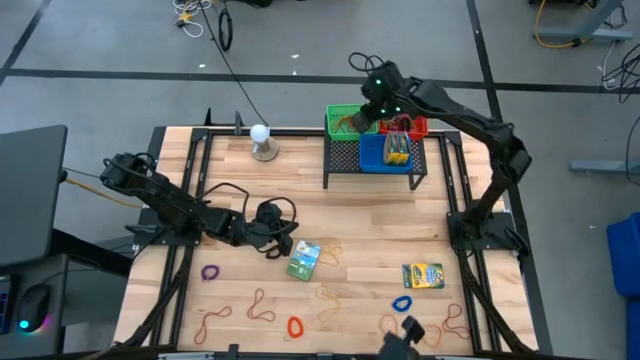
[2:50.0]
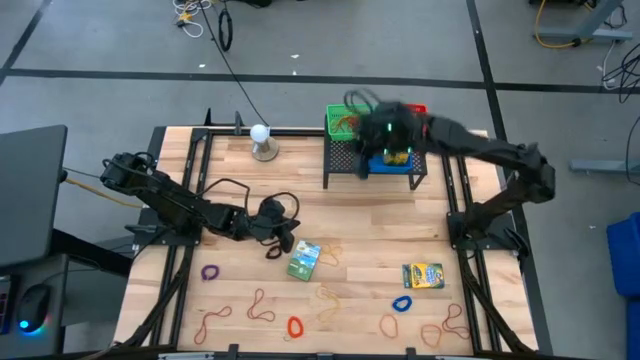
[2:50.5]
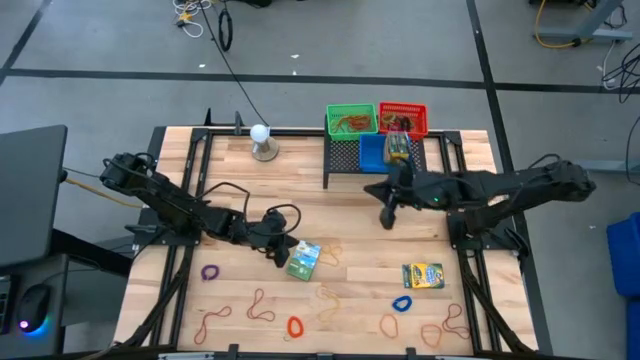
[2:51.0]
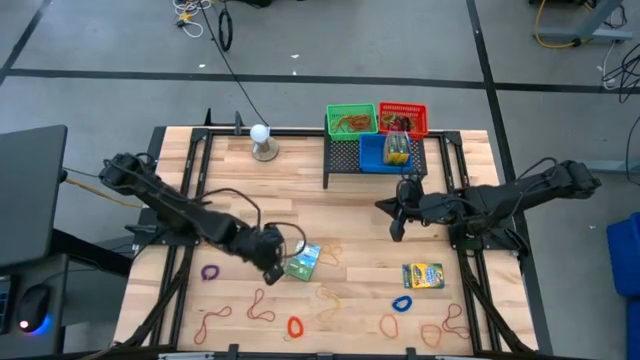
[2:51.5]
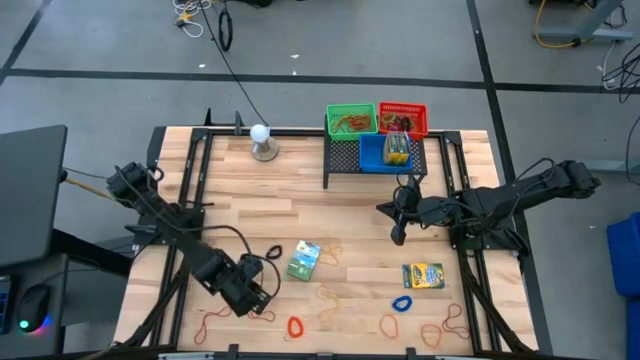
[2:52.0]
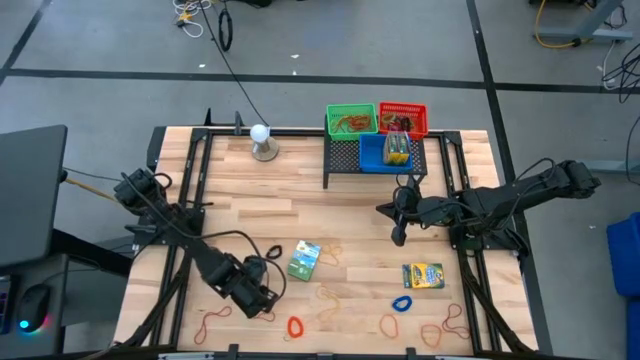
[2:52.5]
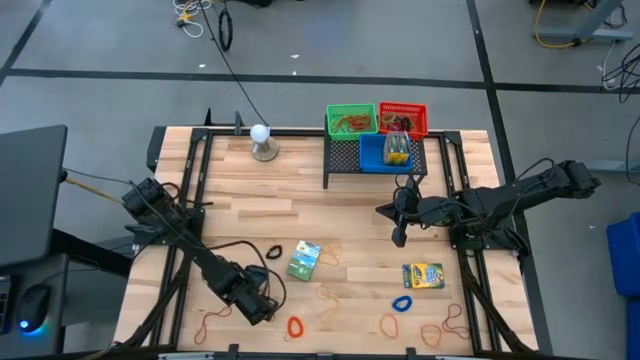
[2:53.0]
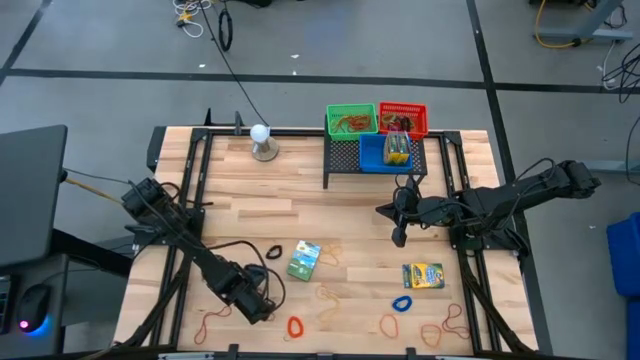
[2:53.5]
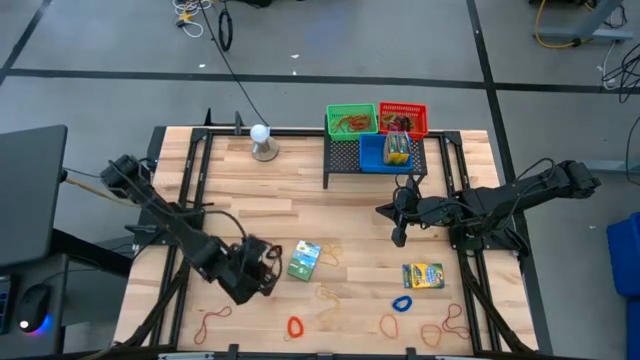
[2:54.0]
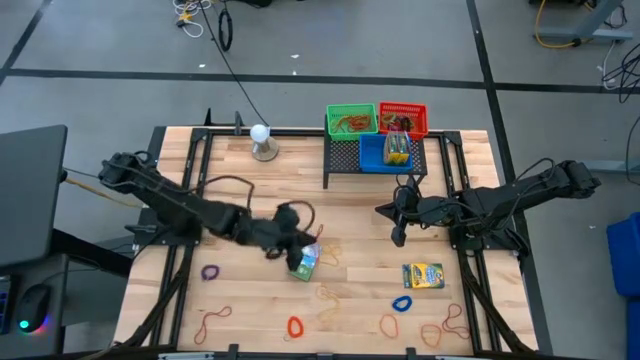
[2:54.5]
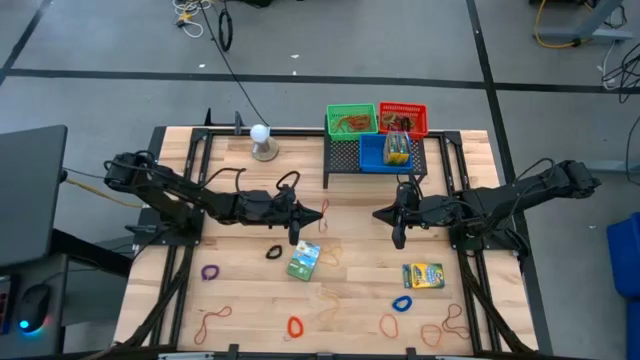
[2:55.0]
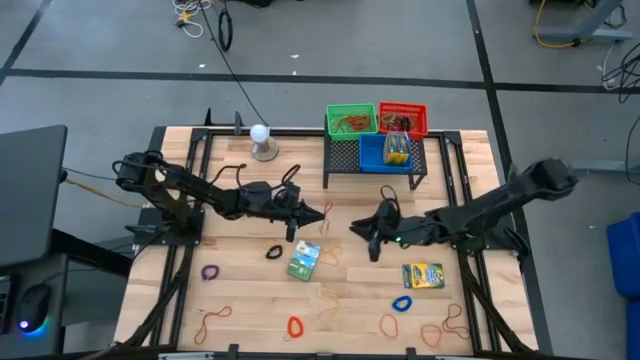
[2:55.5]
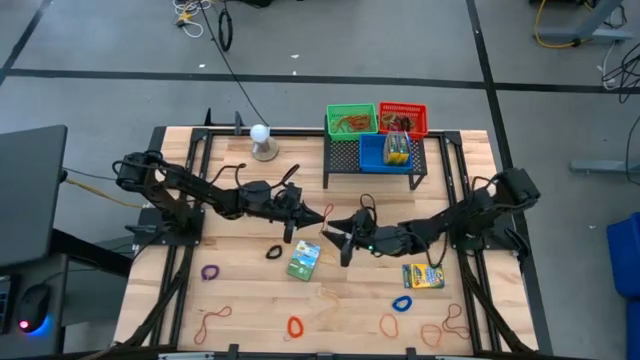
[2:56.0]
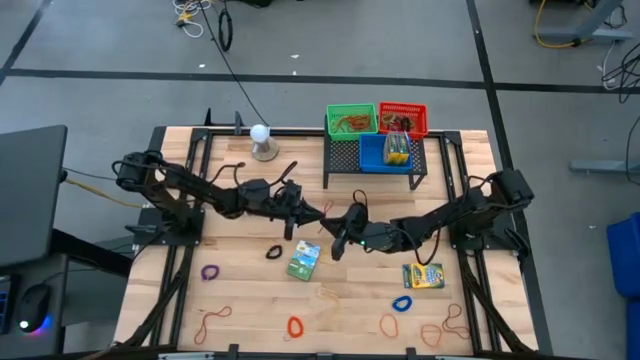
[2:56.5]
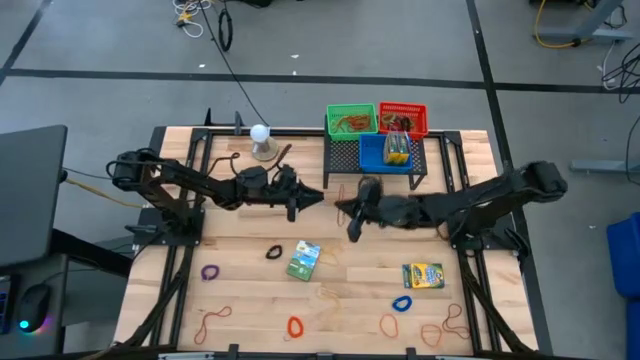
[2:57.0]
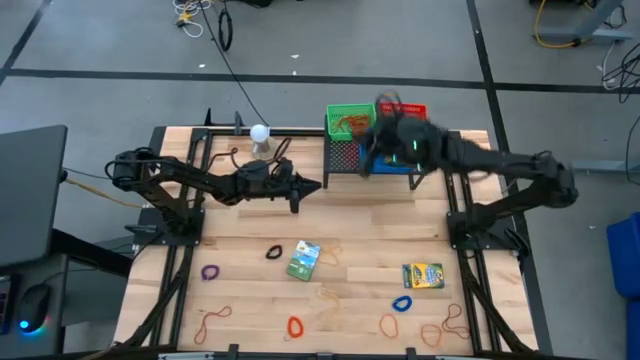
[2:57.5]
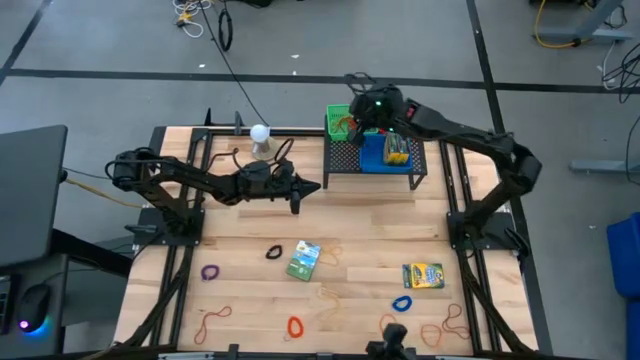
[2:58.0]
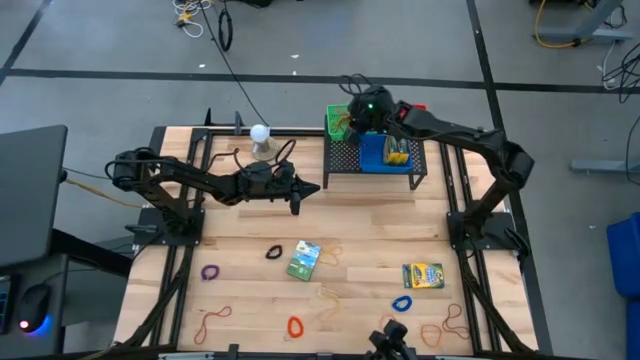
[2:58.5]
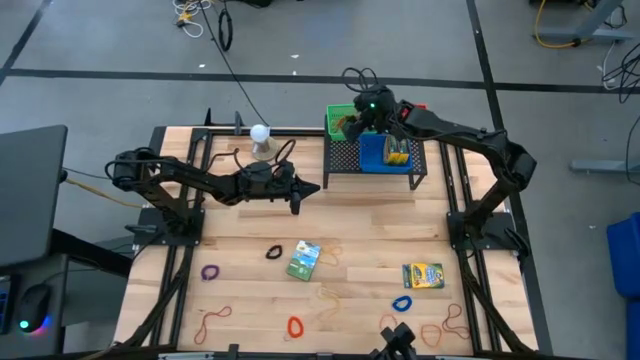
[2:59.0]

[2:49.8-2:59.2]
Task: Pick & Place Office Desk Supplies
Put the red rubber band into the green bin

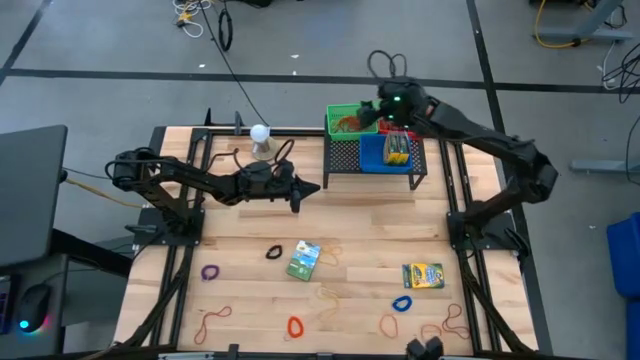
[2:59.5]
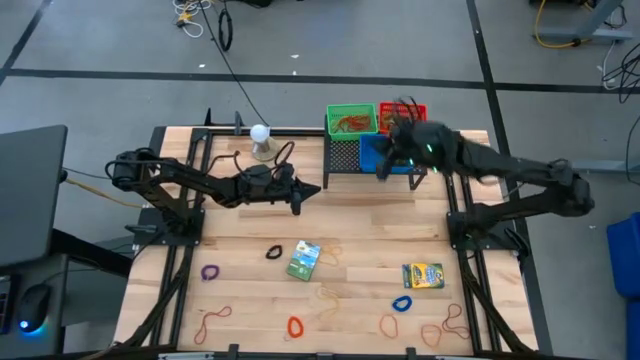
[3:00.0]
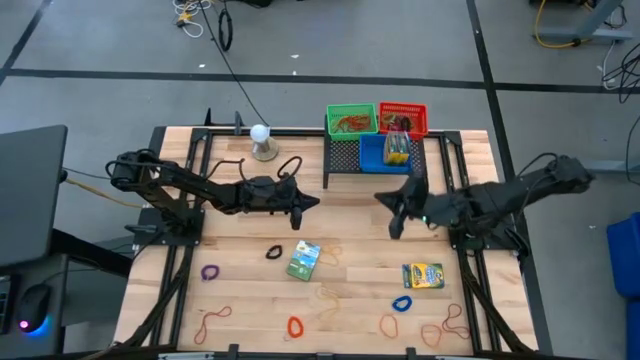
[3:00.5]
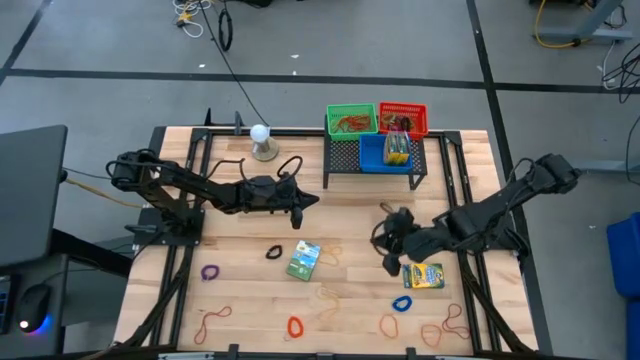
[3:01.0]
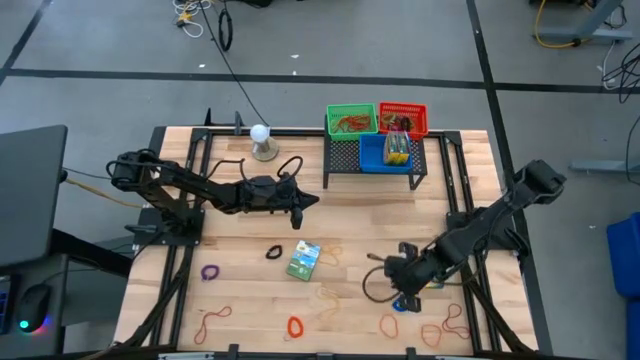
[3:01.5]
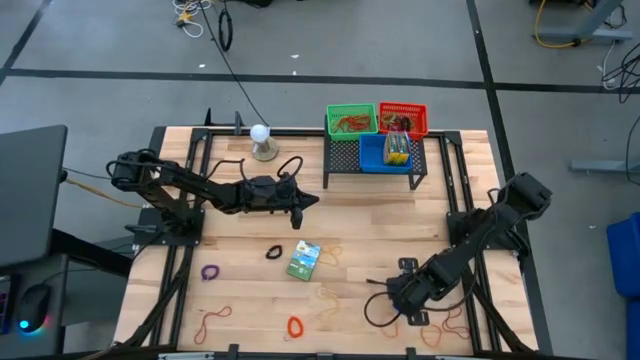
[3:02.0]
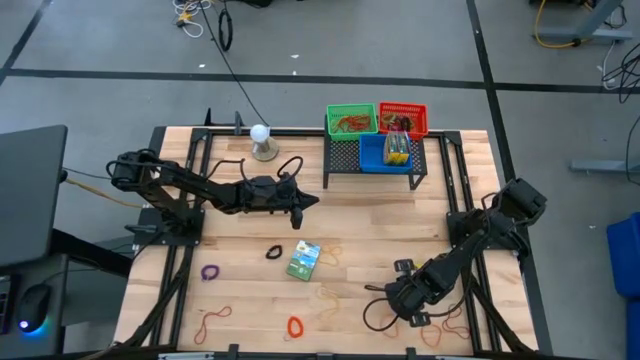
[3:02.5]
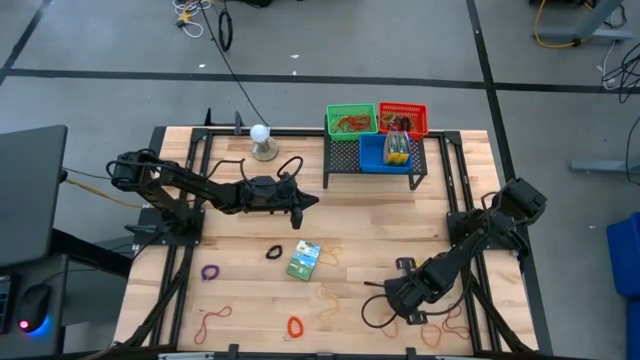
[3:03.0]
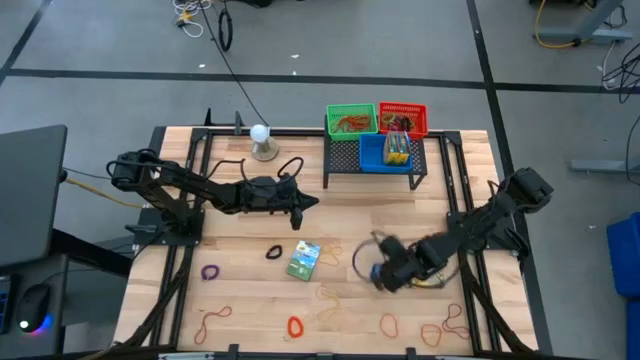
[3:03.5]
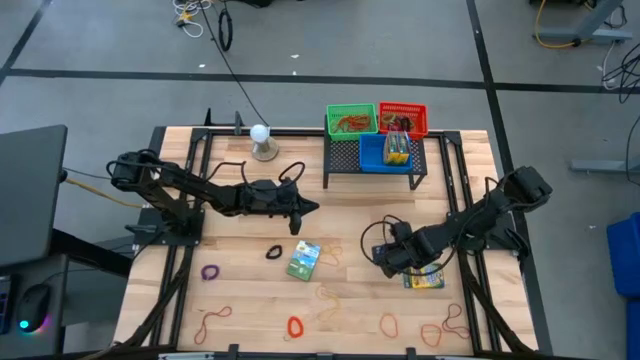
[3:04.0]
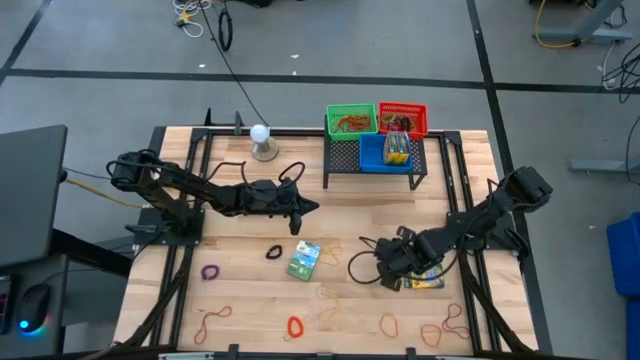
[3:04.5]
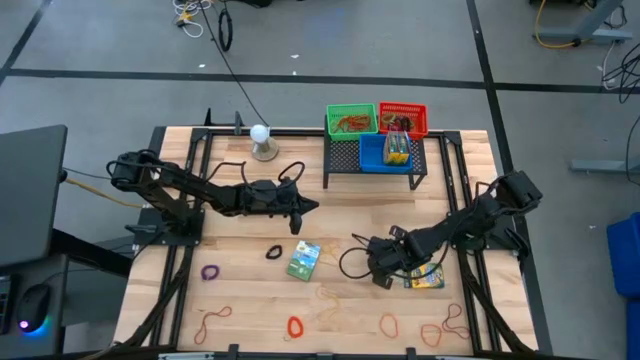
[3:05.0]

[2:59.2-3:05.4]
Put the blue spiral keychain into the red bin

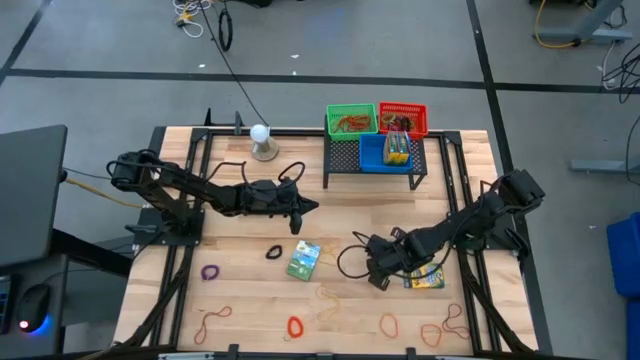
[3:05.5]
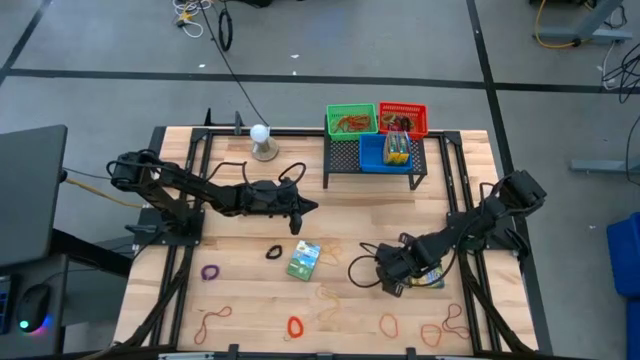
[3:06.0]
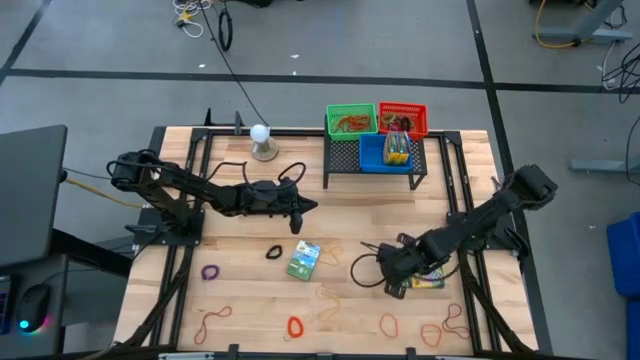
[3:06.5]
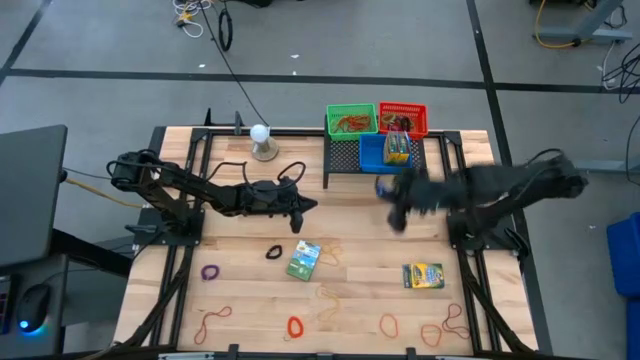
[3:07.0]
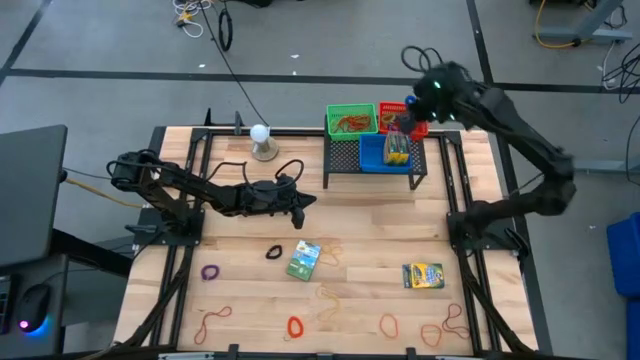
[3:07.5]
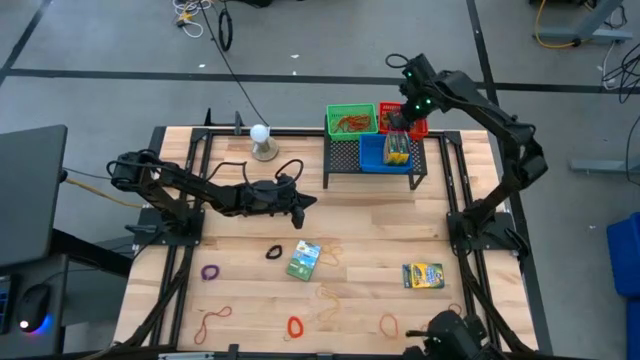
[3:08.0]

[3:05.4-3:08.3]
Put the blue spiral keychain into the red bin

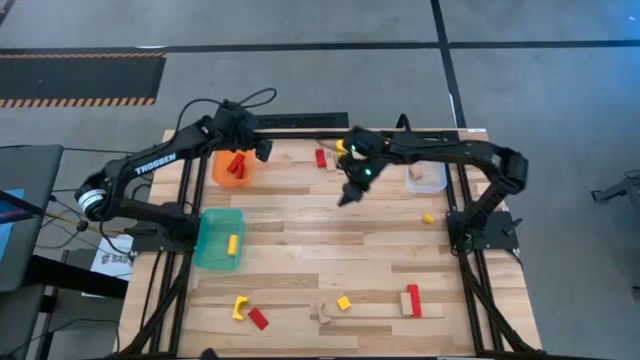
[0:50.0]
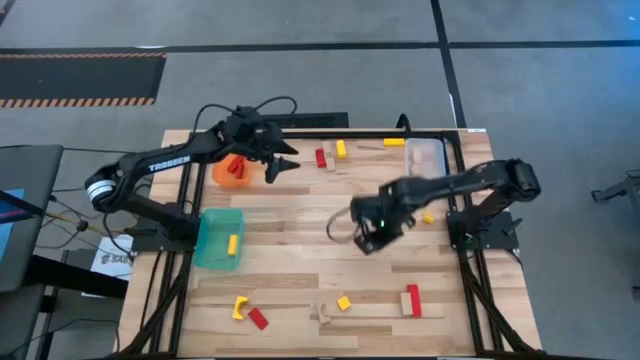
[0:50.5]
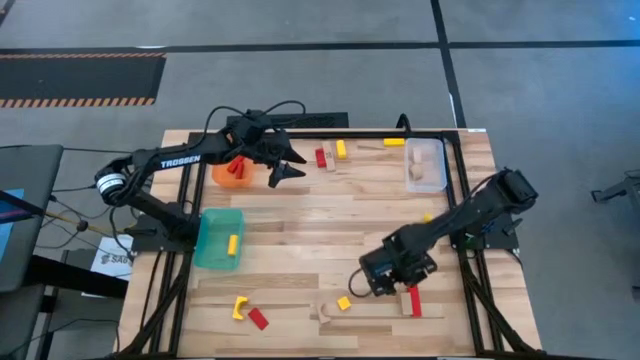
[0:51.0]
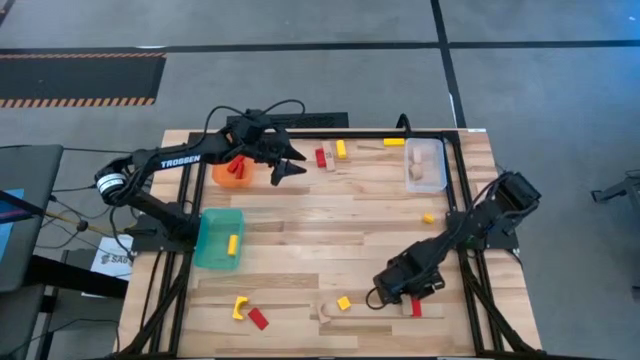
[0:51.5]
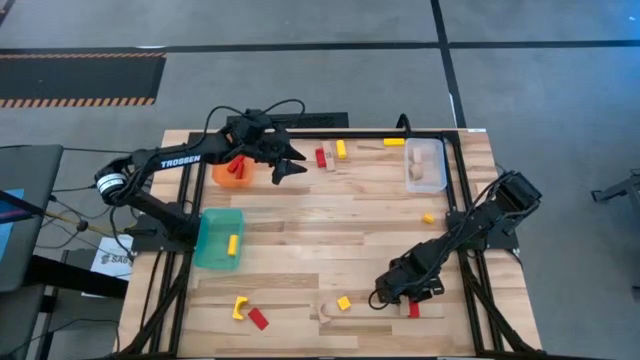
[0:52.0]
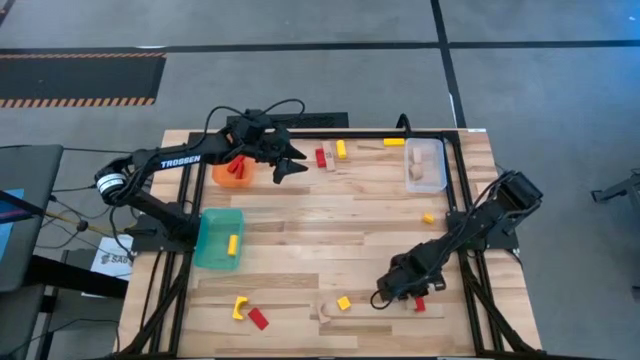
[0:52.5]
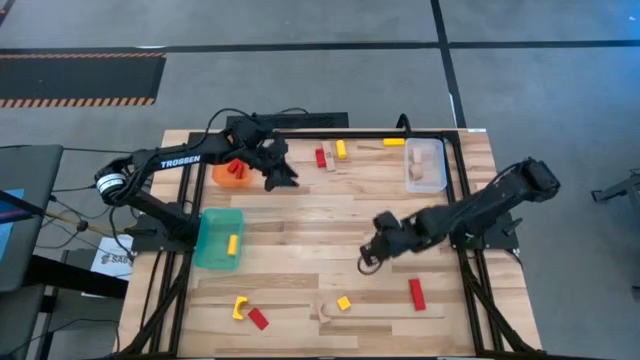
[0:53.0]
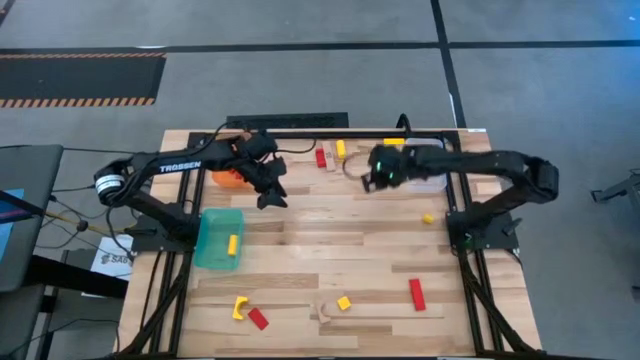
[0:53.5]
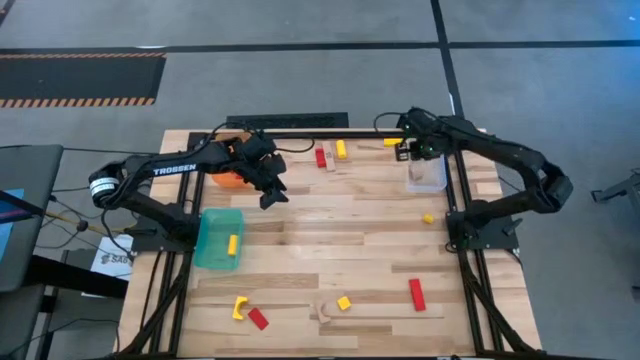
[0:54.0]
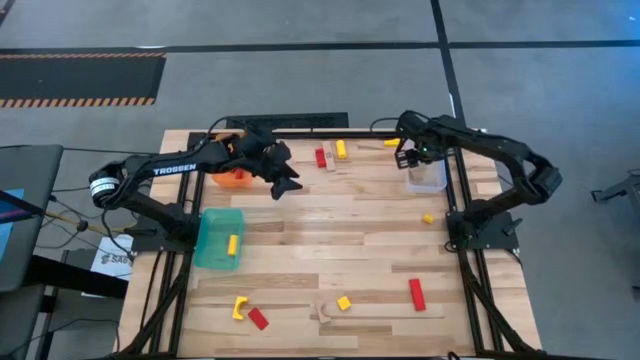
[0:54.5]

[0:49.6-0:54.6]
Task: Sort & place blocks by color
Put the brown wooden block into the white bin
